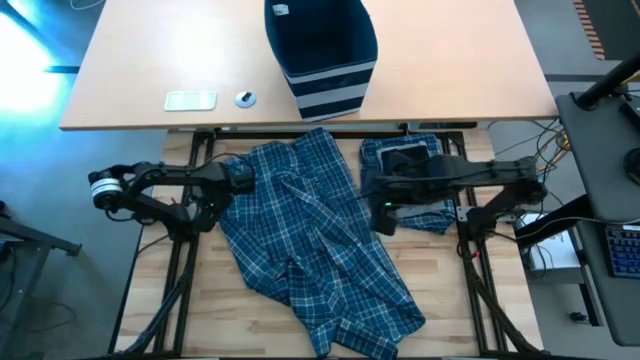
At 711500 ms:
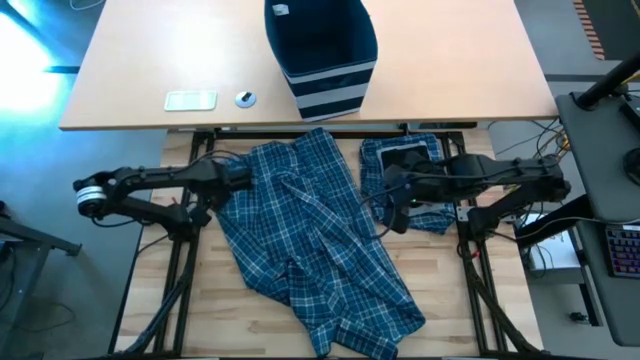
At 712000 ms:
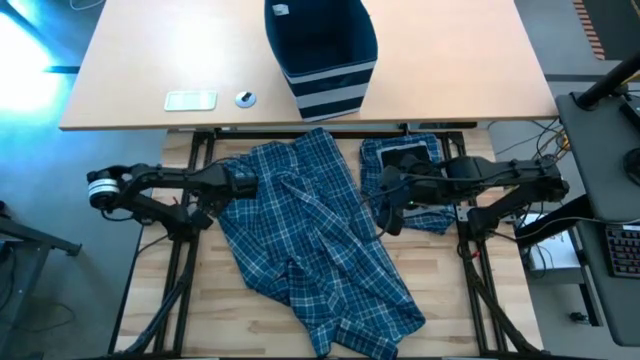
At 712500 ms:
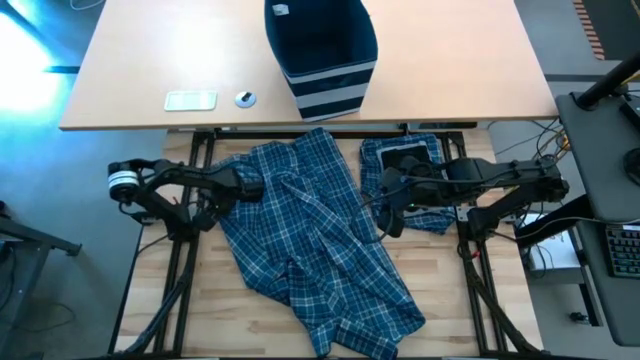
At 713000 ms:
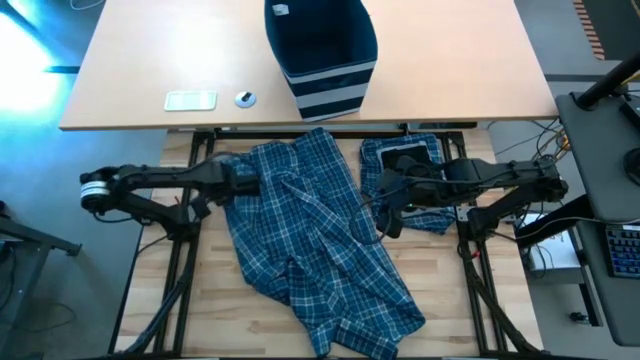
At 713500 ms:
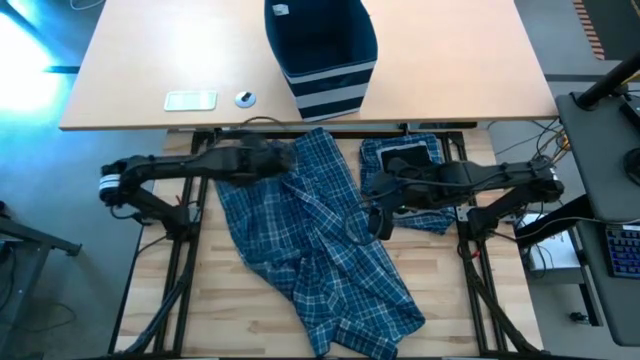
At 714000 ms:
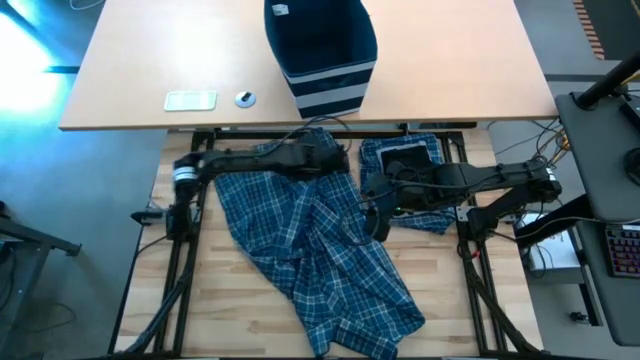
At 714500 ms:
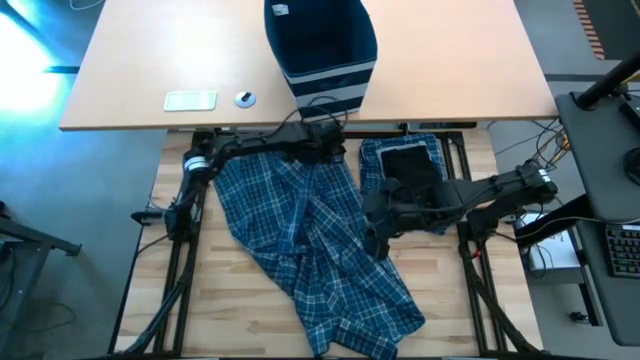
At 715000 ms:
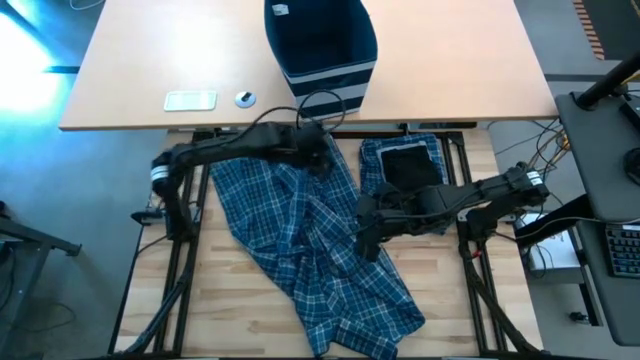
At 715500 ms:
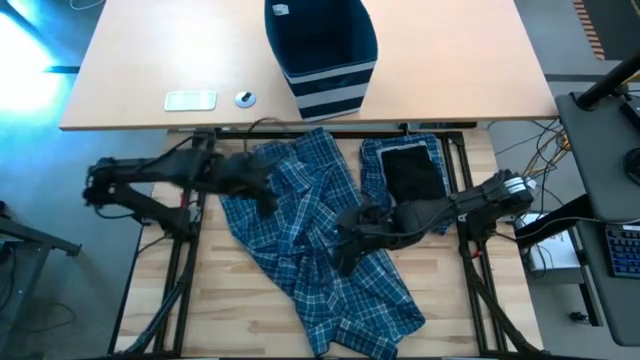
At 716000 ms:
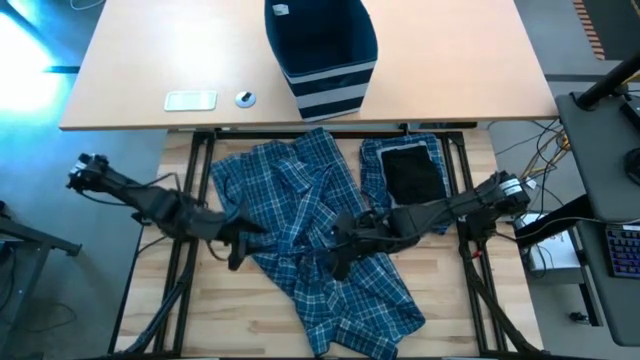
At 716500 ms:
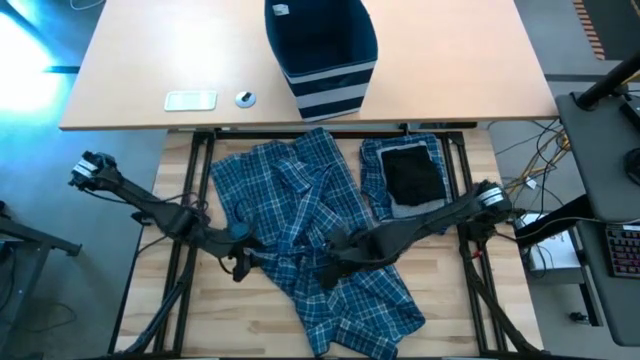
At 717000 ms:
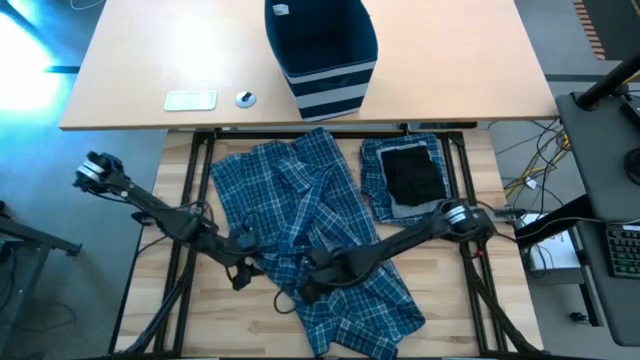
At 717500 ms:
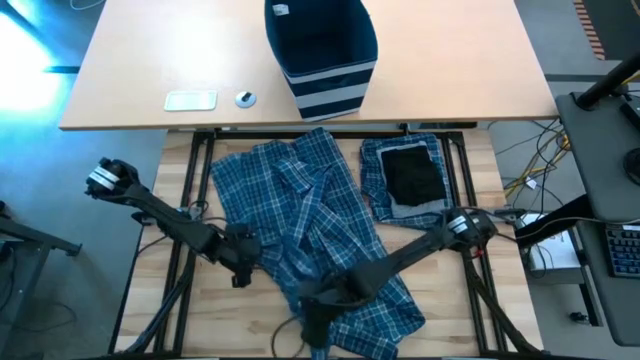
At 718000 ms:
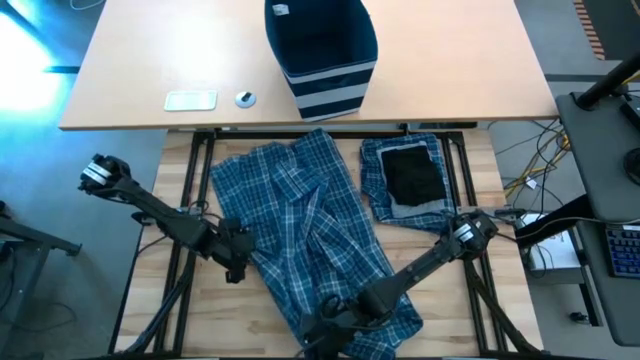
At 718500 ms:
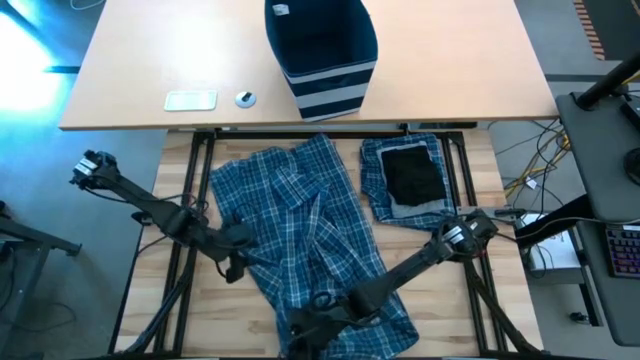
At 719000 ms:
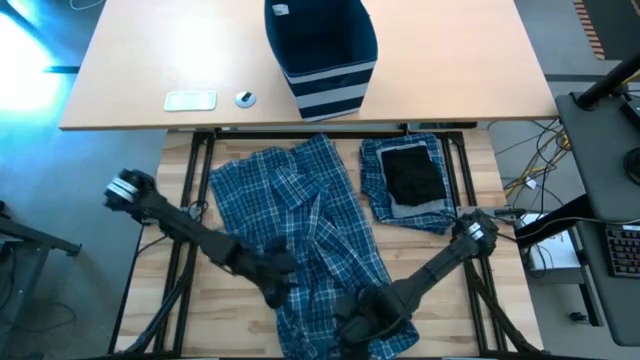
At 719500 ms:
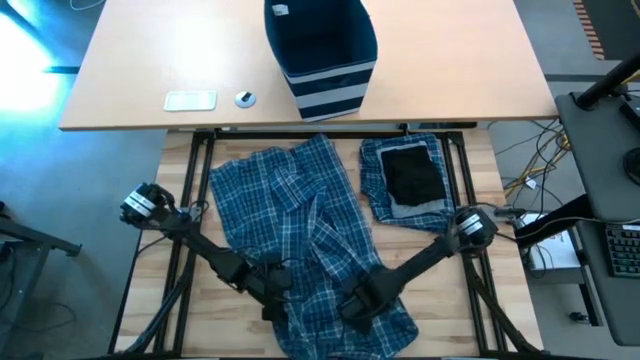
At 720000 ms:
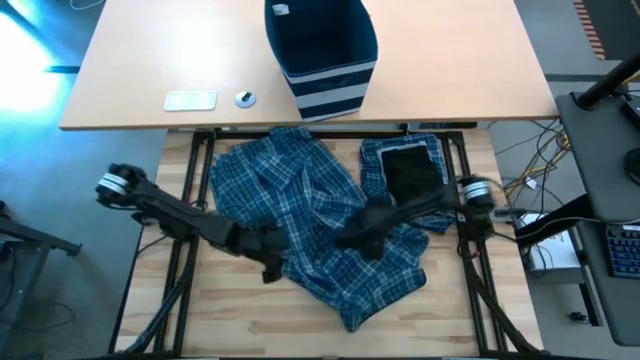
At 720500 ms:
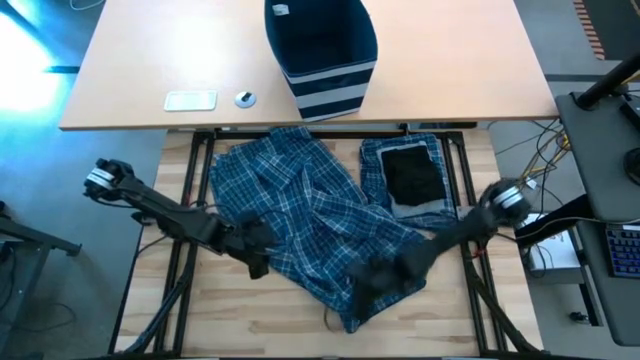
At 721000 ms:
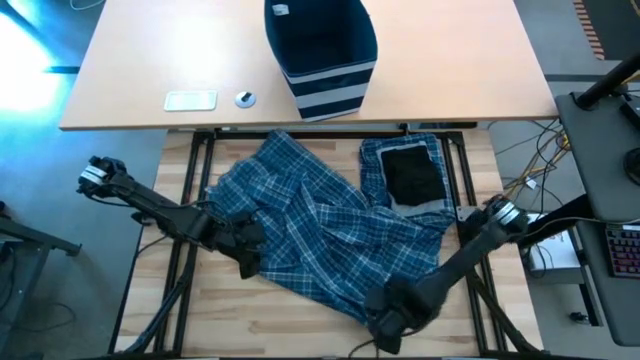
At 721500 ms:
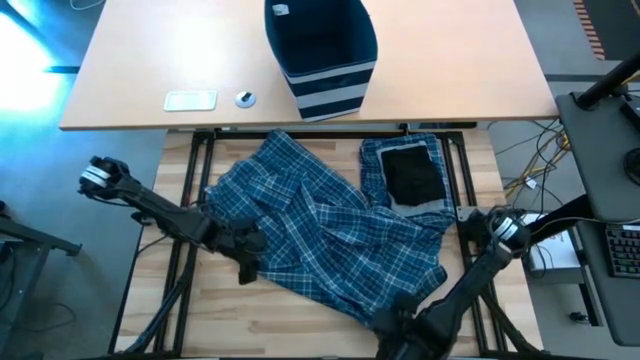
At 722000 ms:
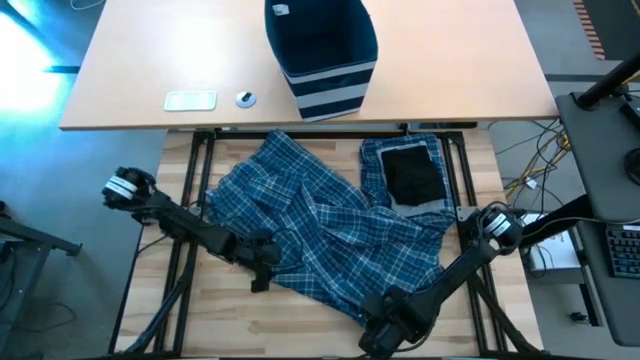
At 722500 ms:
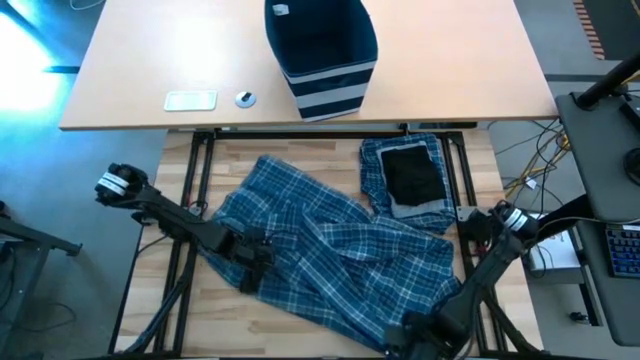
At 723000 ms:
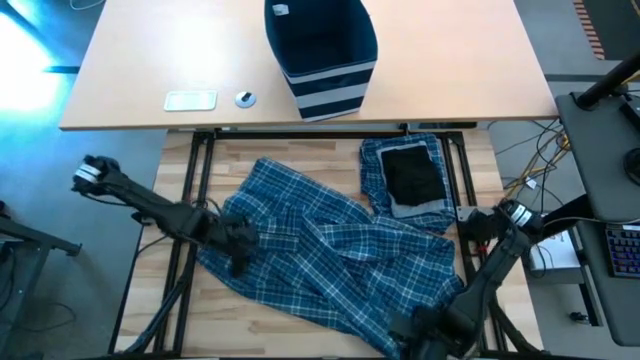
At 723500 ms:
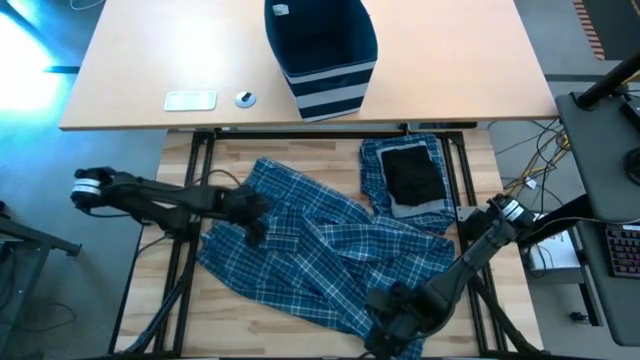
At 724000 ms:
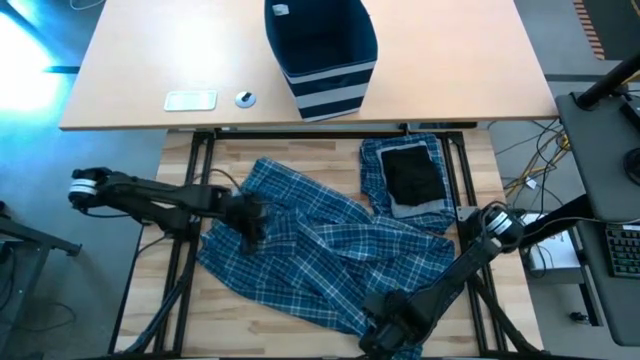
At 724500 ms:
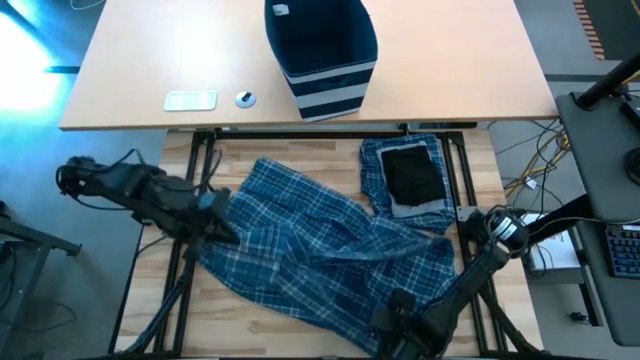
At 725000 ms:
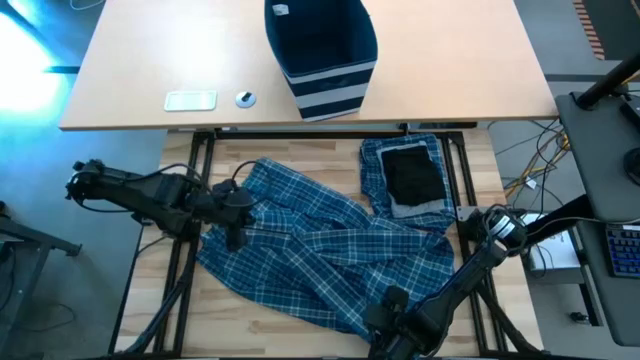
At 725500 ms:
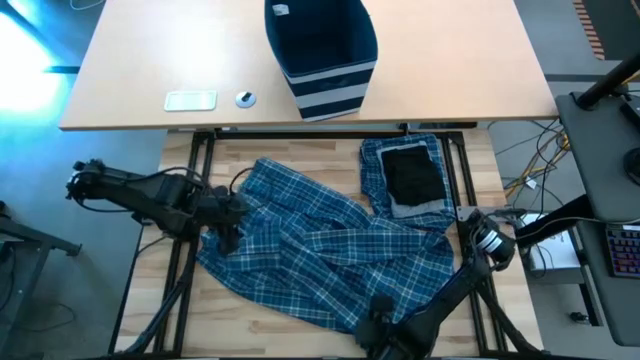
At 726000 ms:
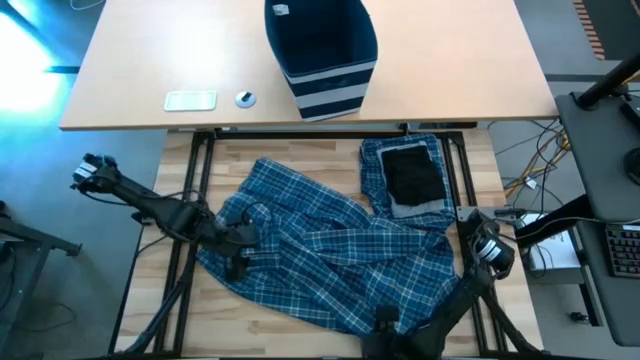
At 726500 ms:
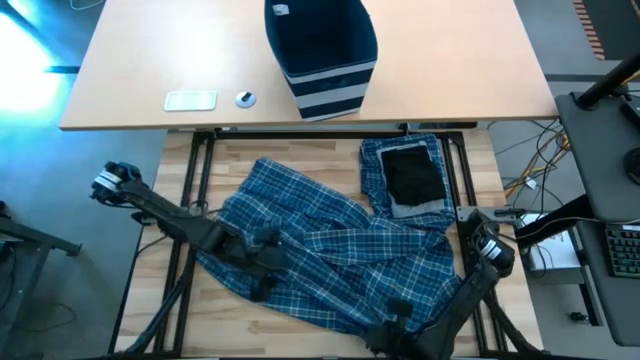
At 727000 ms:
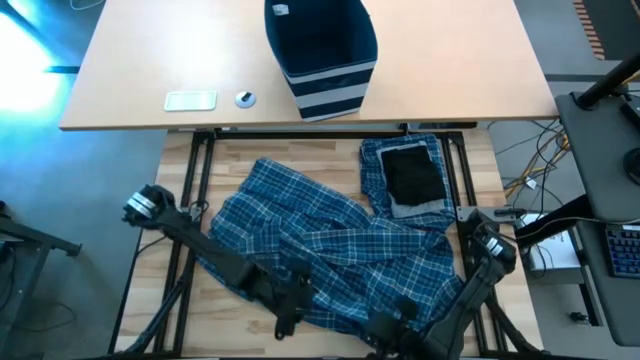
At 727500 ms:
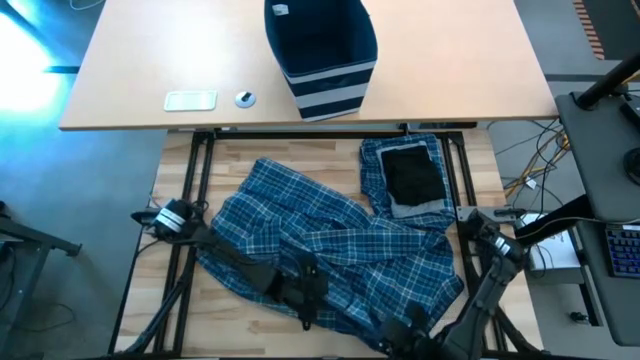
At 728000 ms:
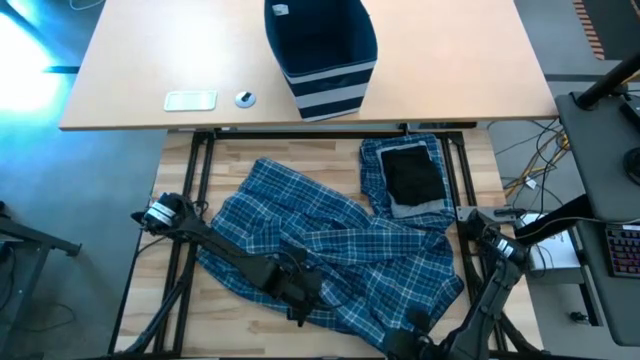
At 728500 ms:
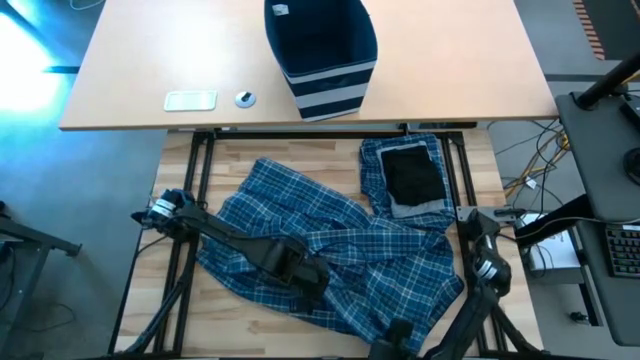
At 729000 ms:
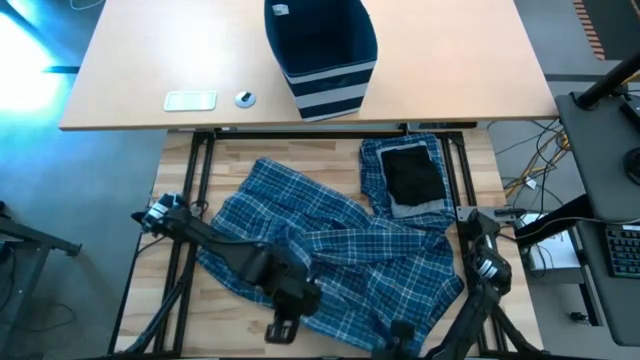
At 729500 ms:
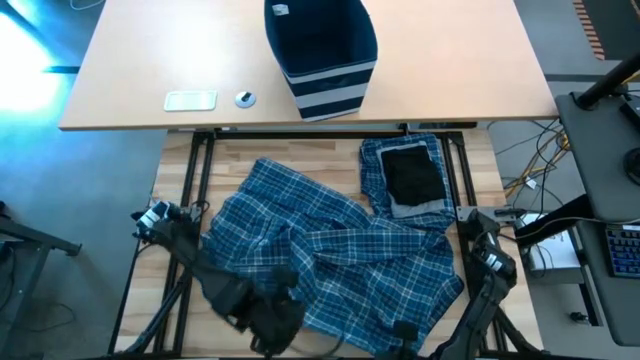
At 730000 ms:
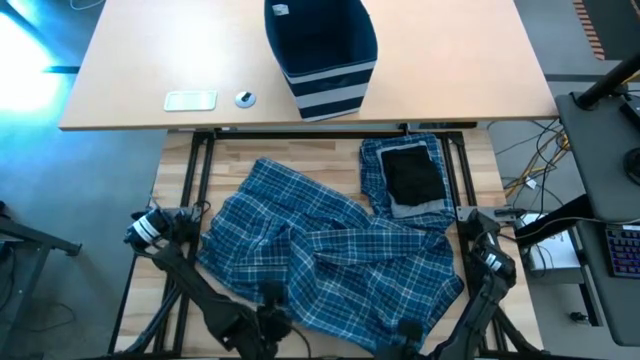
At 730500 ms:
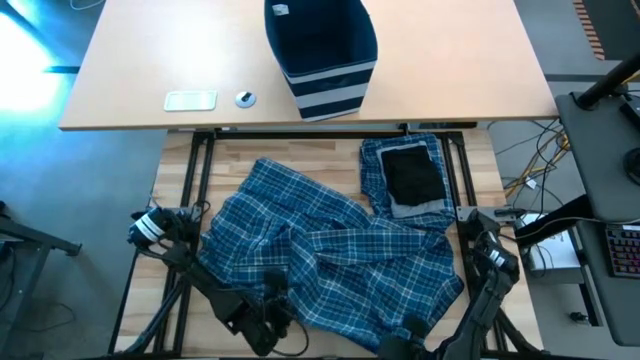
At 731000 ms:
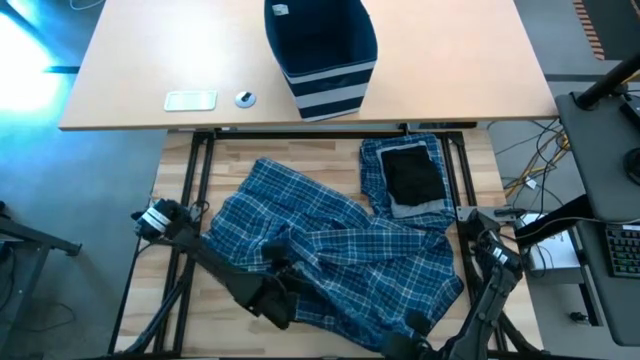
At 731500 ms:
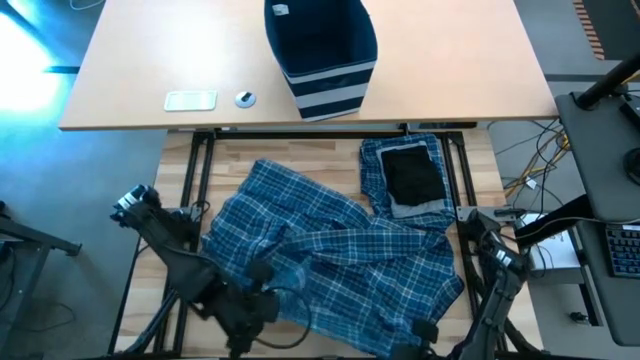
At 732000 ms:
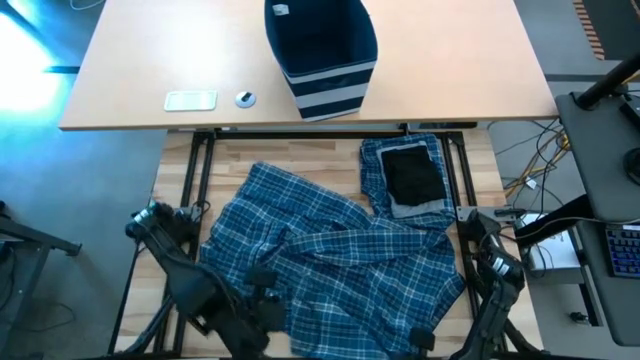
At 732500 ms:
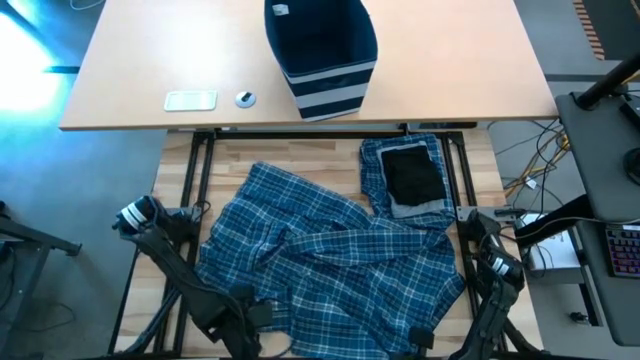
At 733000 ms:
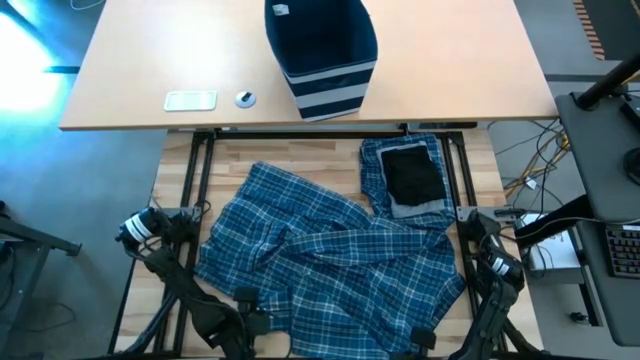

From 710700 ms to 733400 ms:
Task: Fold Laundry from Bin
Fold the blue patterned long sleeve
